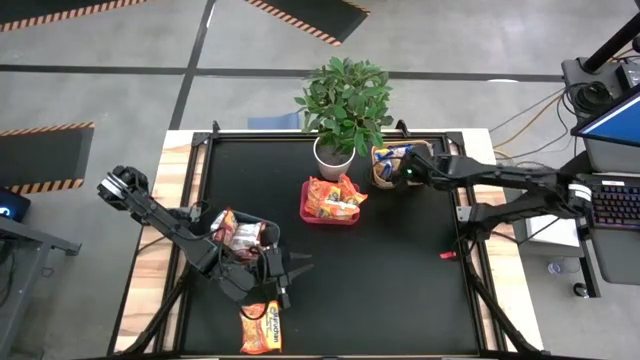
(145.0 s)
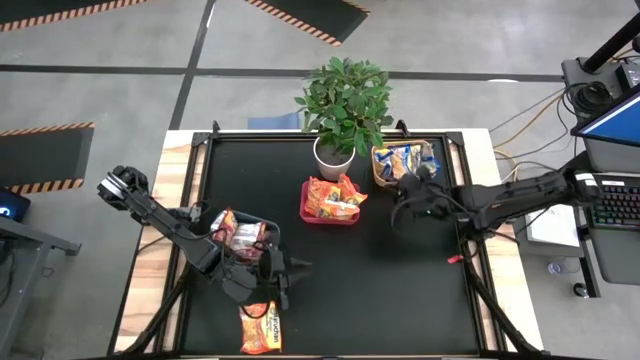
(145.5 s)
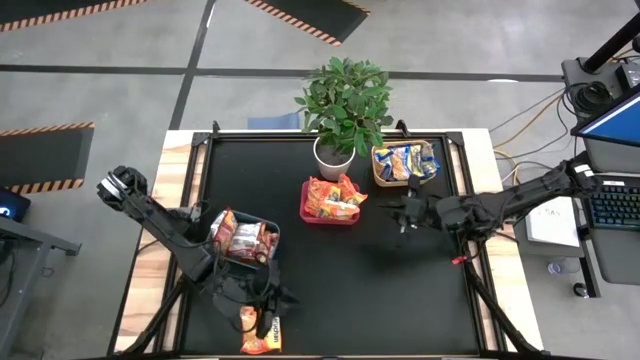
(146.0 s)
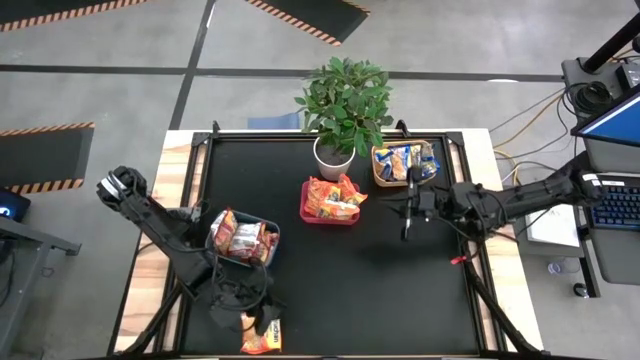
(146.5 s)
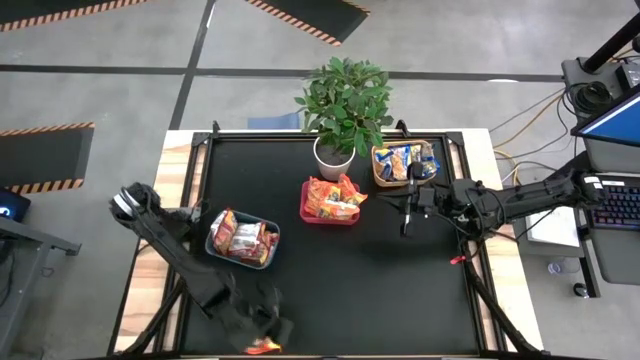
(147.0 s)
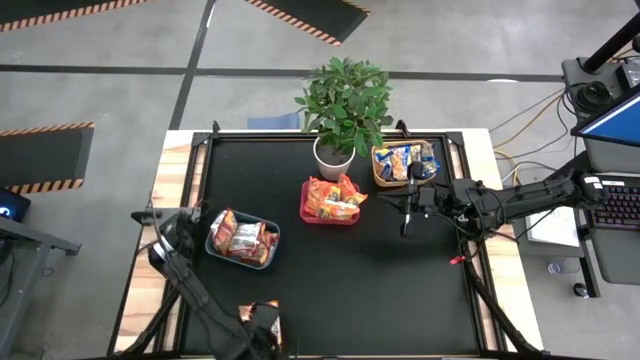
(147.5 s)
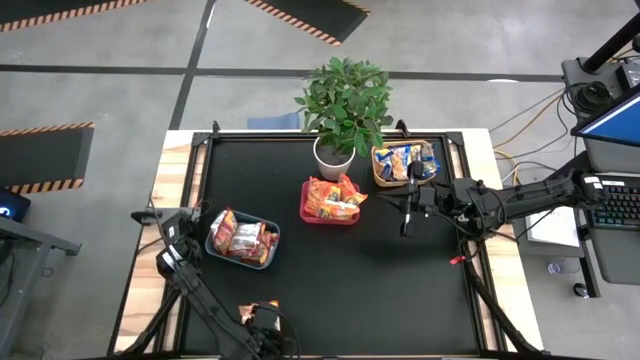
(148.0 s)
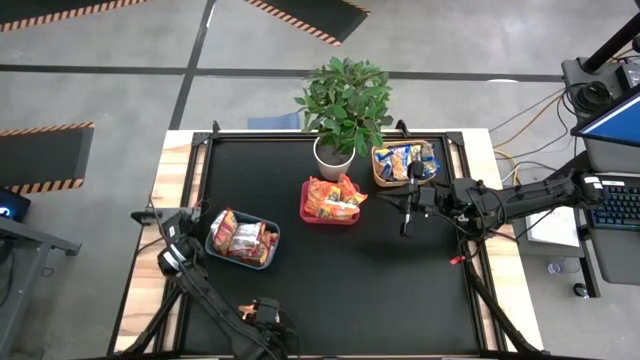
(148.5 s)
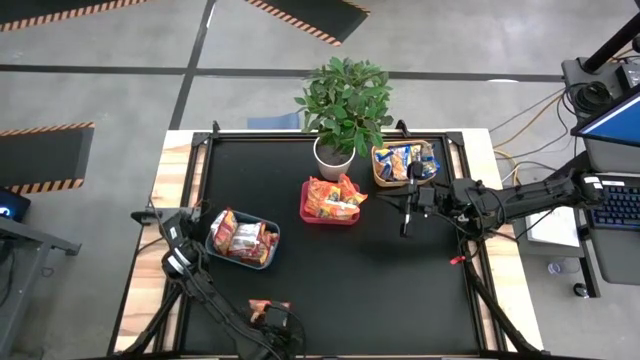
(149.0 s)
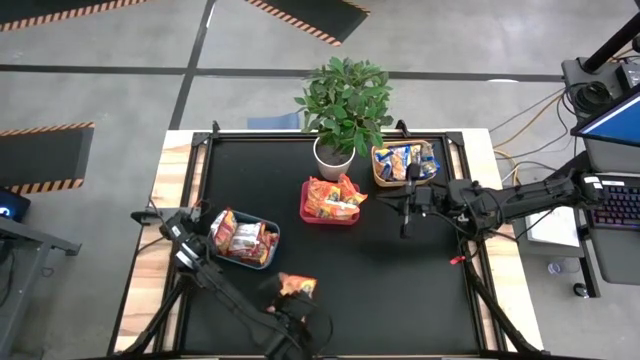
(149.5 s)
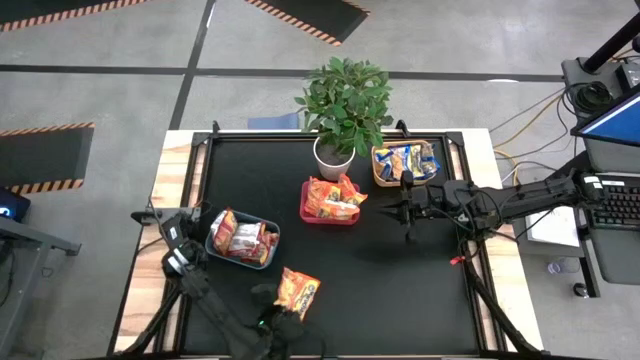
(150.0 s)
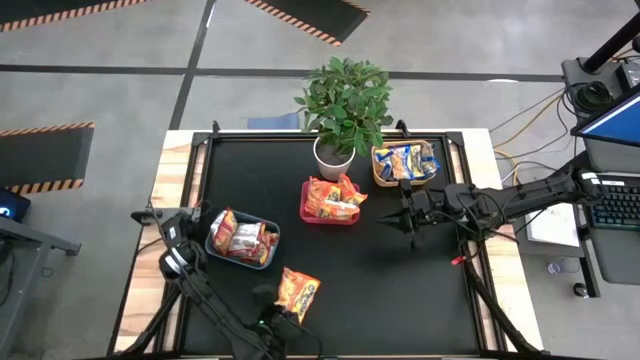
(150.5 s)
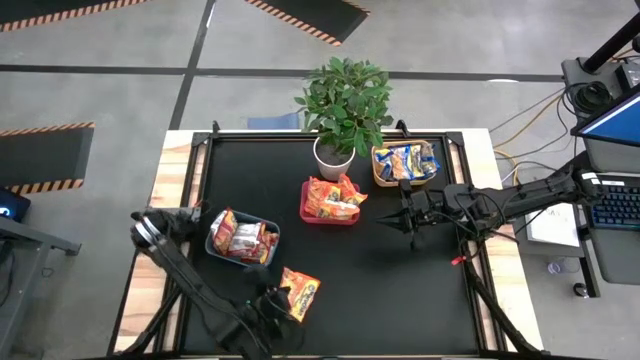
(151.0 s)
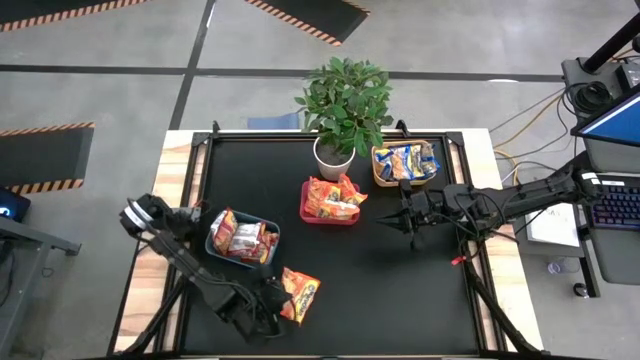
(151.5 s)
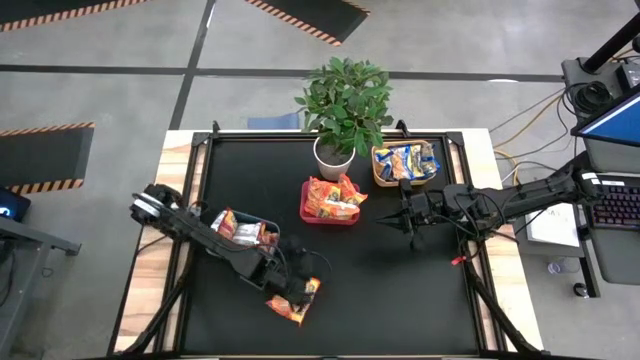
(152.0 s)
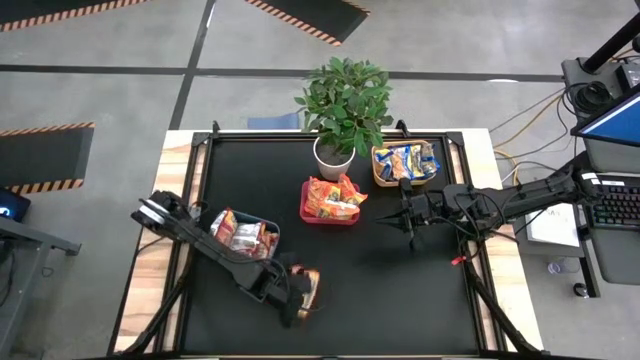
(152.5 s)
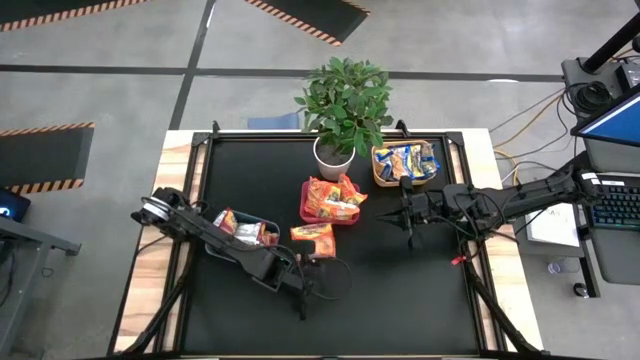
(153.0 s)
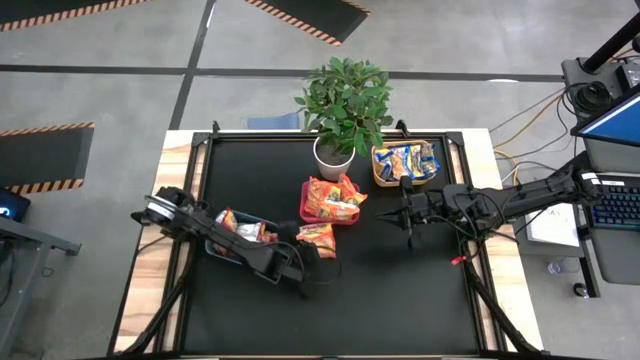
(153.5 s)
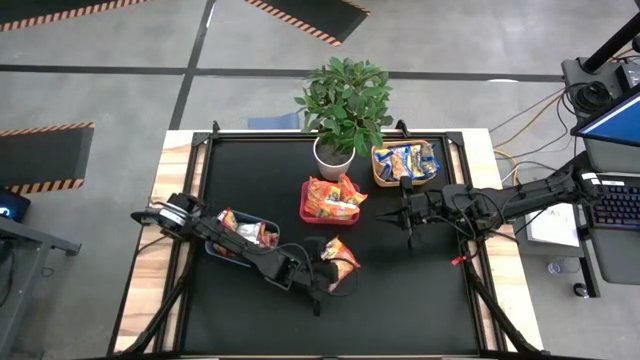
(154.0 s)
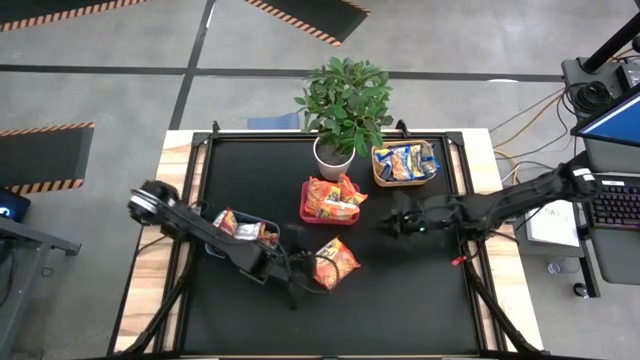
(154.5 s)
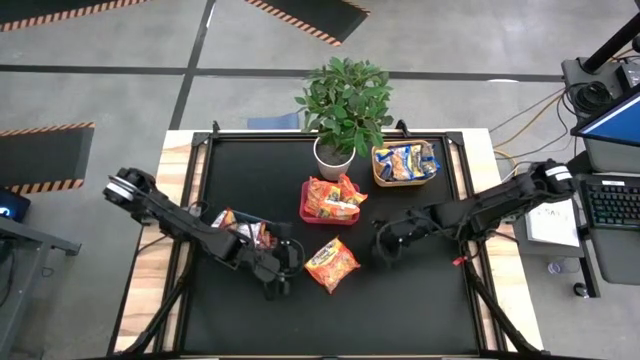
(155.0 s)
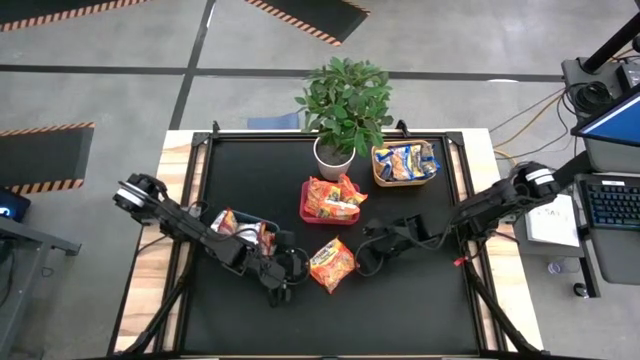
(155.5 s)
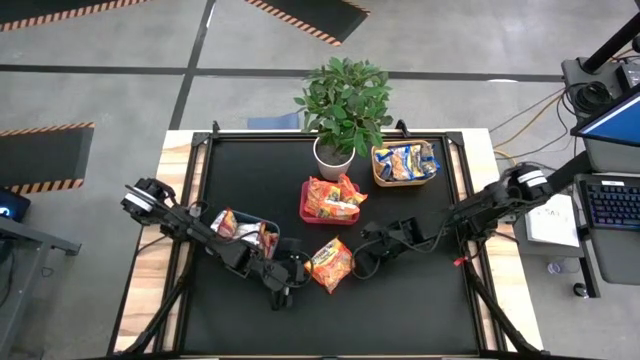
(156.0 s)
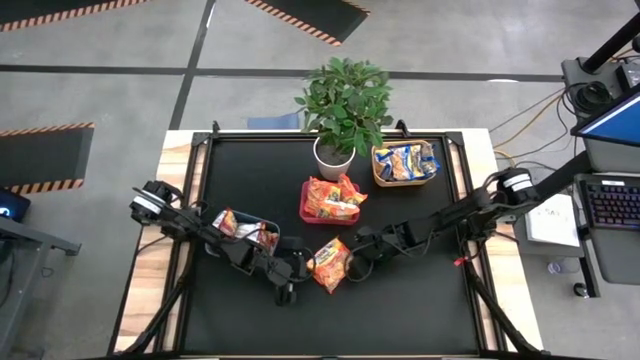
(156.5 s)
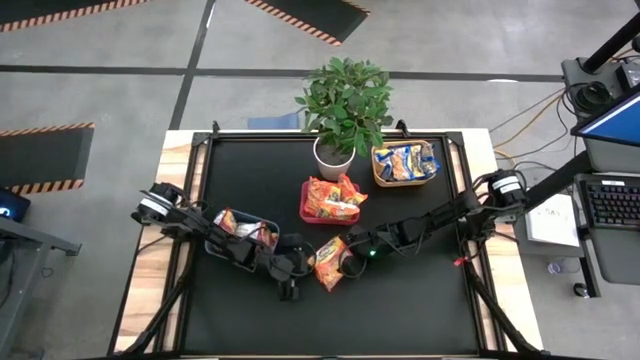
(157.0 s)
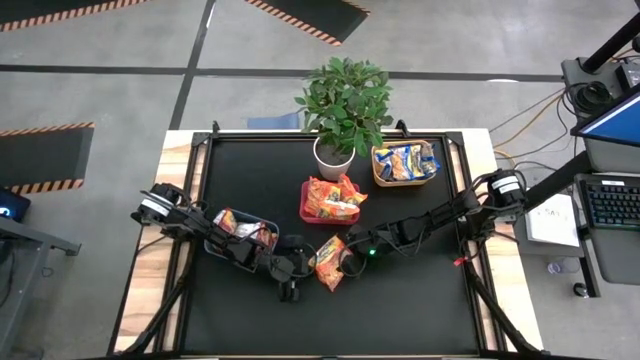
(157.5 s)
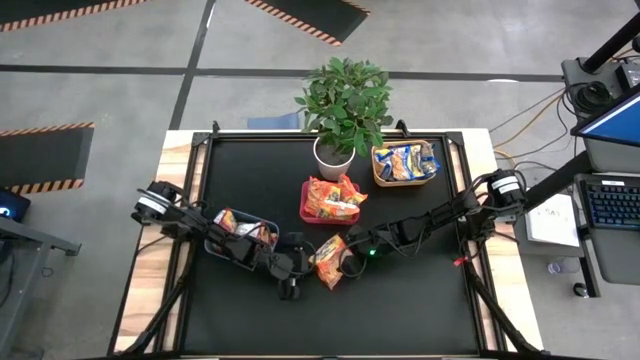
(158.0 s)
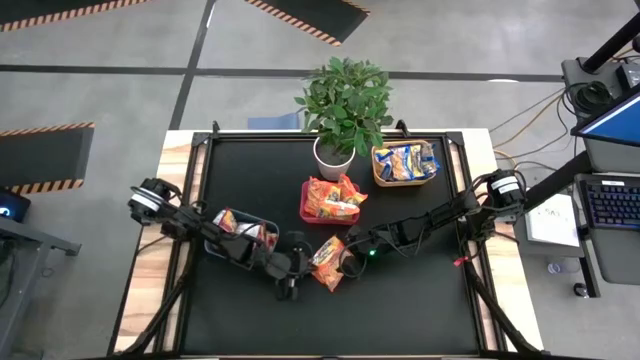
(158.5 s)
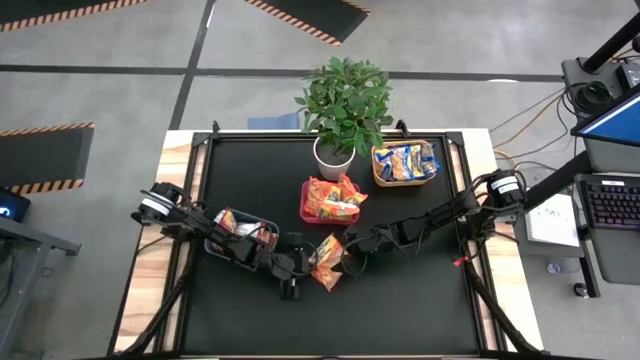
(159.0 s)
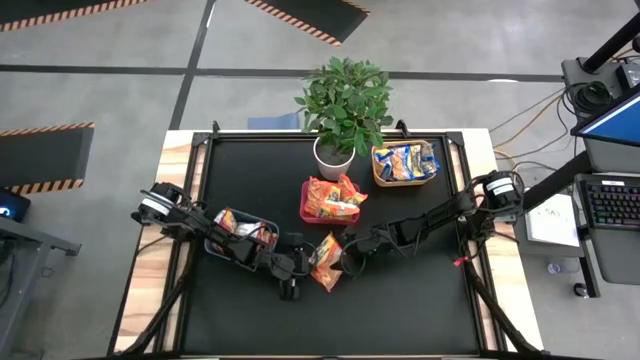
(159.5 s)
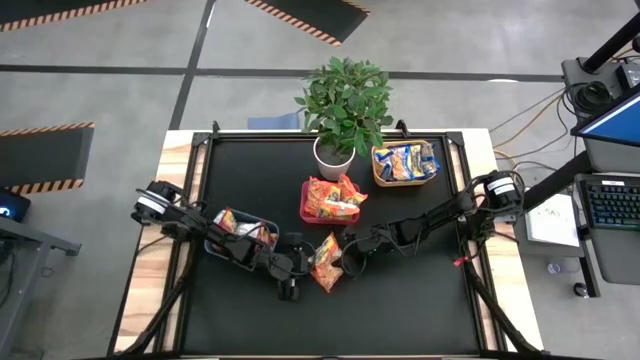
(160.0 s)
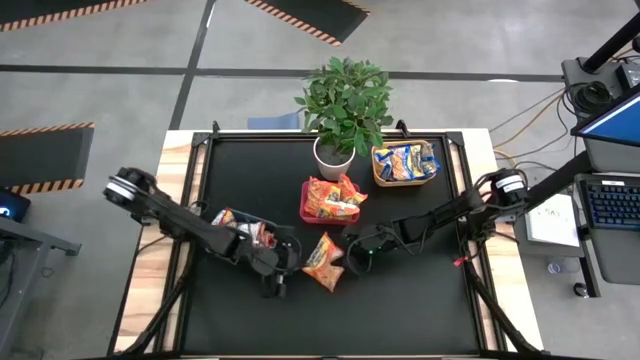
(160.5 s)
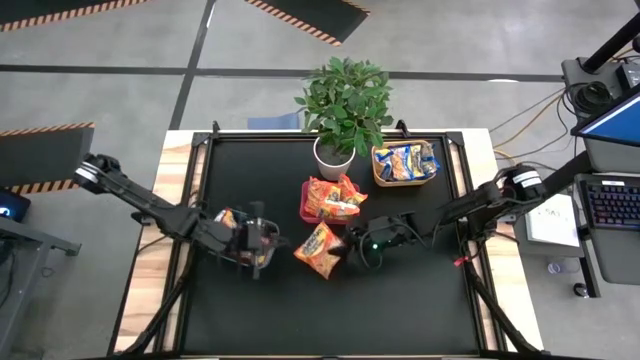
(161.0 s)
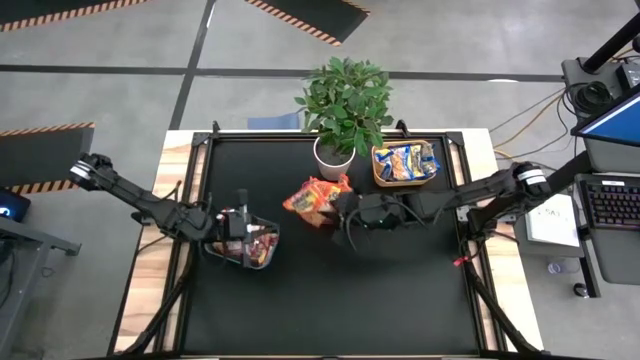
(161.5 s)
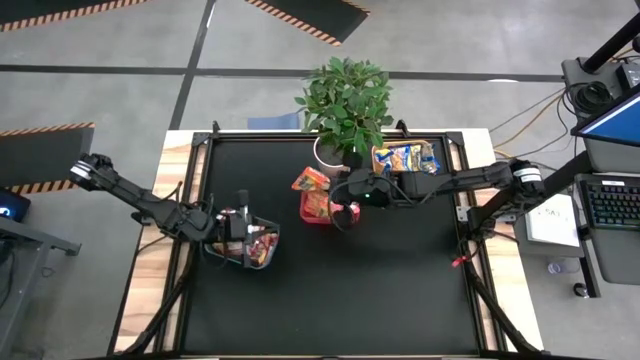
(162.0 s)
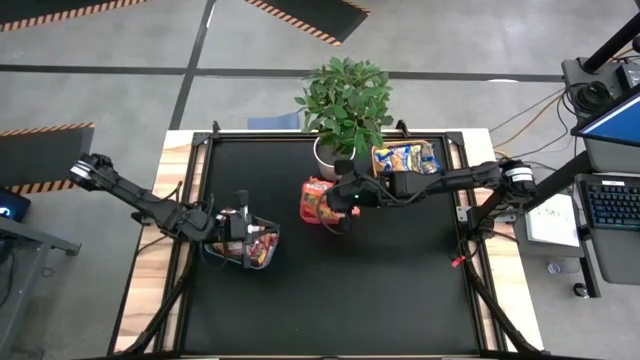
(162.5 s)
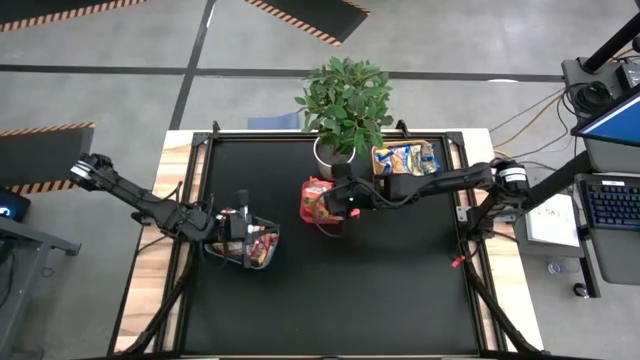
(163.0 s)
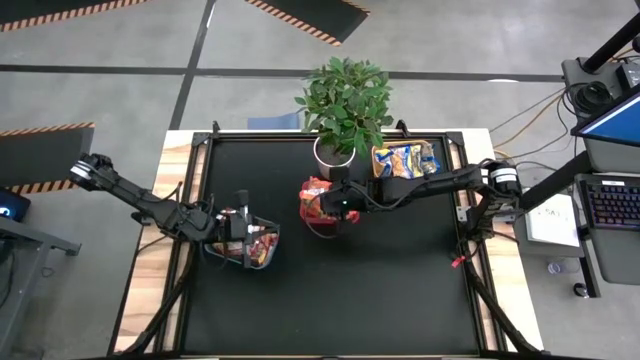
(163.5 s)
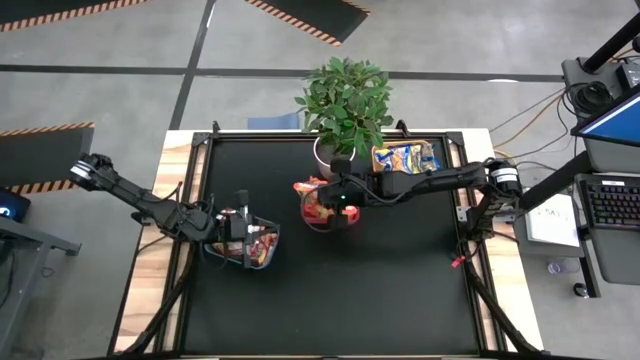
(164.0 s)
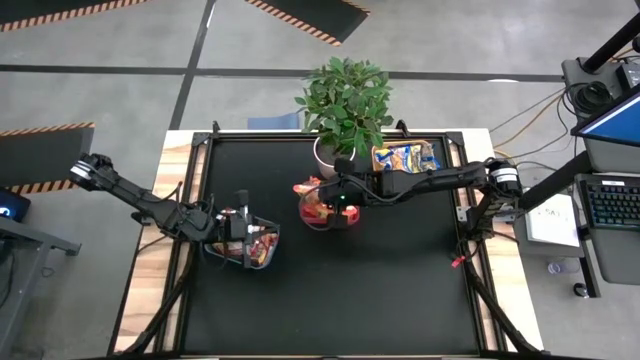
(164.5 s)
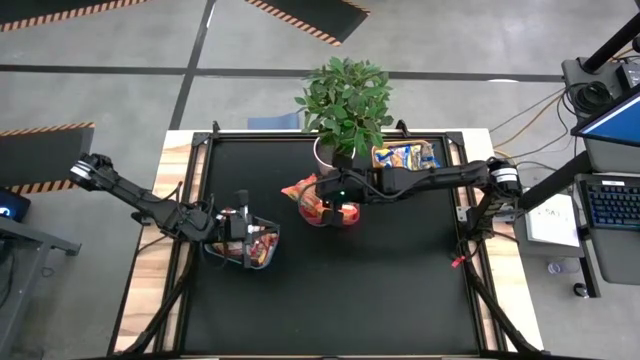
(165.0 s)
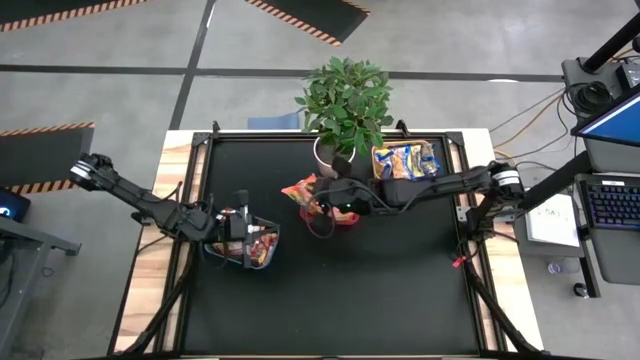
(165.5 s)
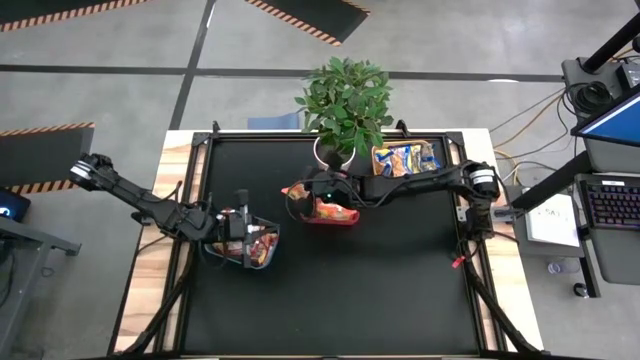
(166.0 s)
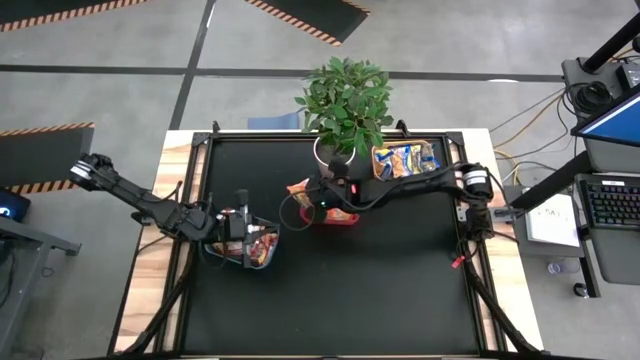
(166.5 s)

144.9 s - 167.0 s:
Task: Sort Maruchan noodles
Put the orange noodle pack into the red bin
